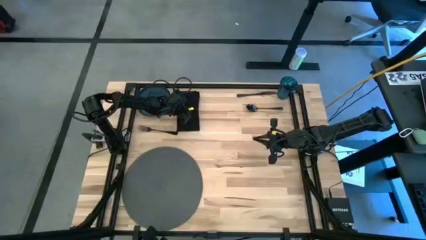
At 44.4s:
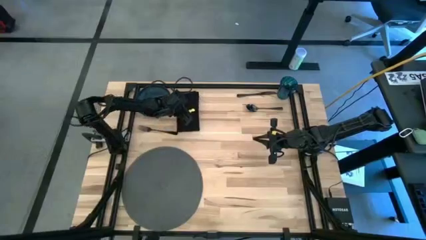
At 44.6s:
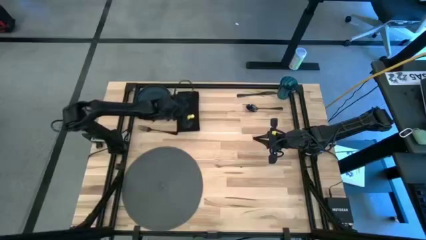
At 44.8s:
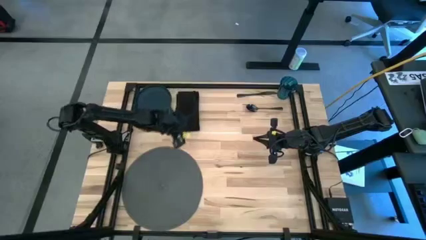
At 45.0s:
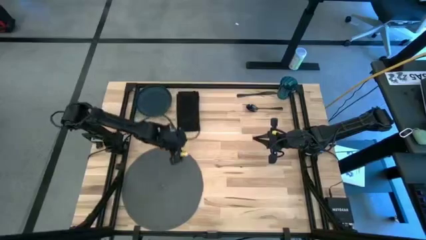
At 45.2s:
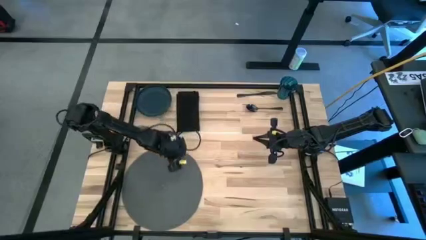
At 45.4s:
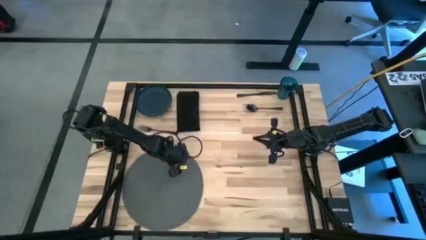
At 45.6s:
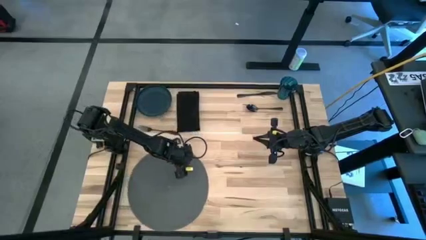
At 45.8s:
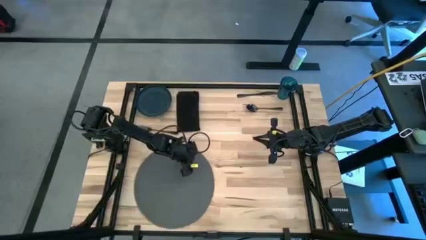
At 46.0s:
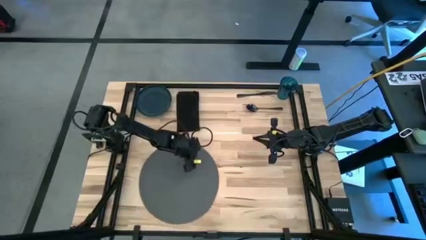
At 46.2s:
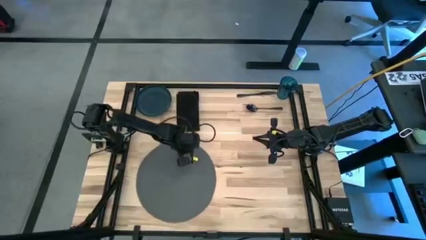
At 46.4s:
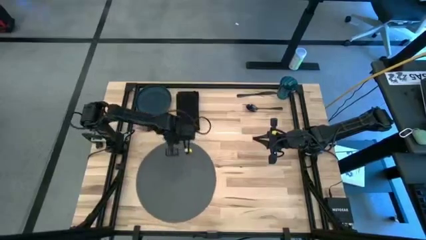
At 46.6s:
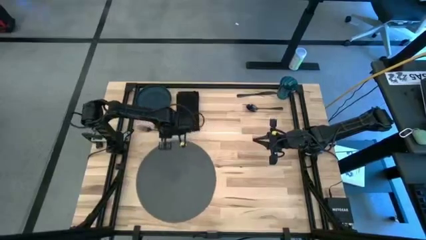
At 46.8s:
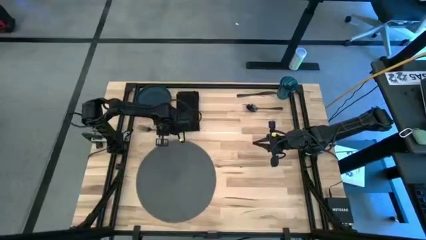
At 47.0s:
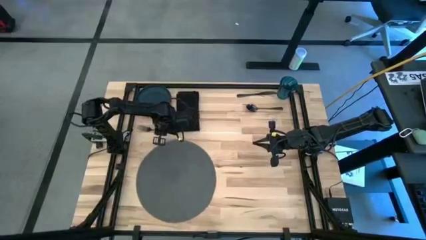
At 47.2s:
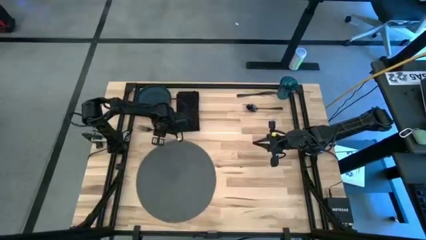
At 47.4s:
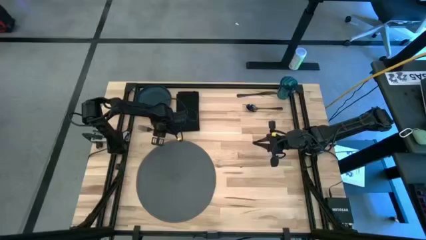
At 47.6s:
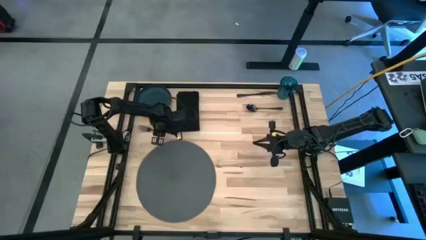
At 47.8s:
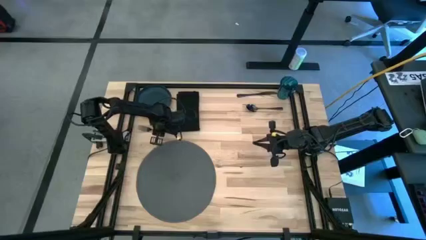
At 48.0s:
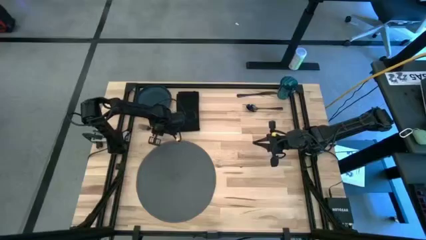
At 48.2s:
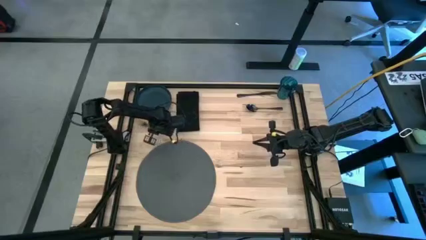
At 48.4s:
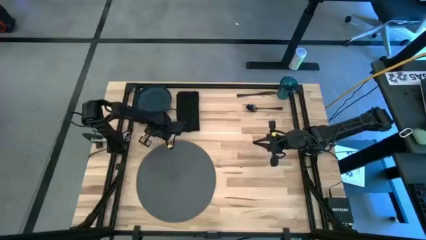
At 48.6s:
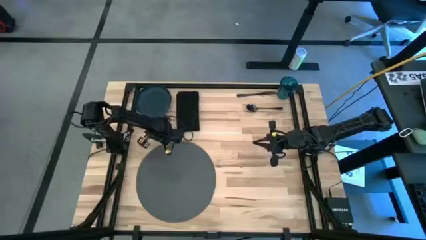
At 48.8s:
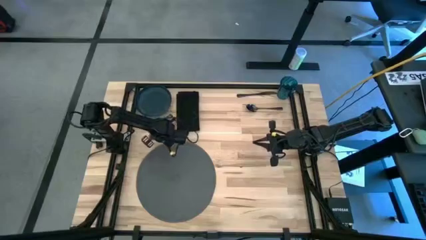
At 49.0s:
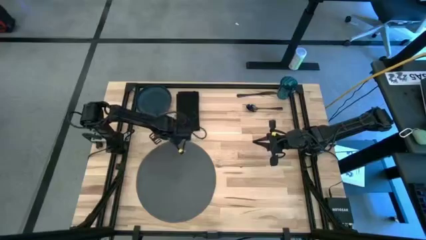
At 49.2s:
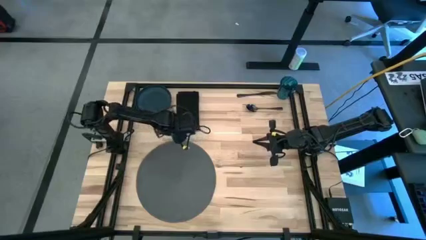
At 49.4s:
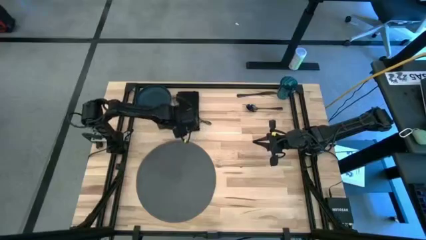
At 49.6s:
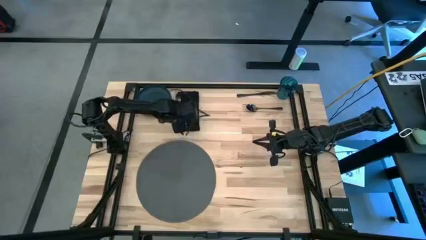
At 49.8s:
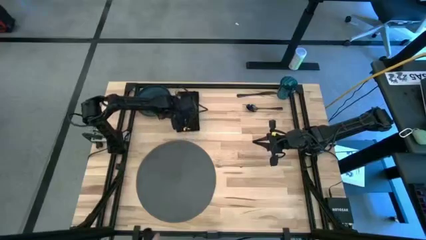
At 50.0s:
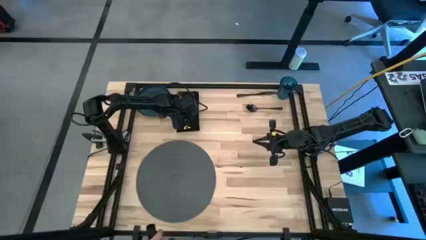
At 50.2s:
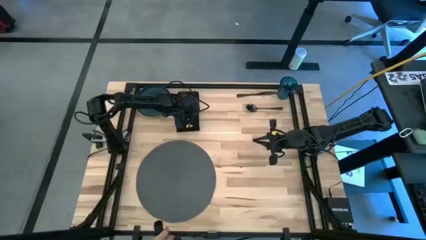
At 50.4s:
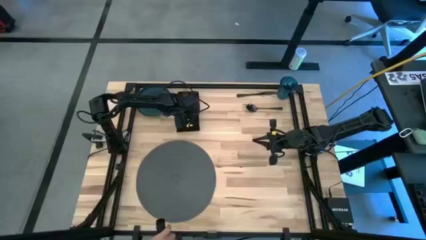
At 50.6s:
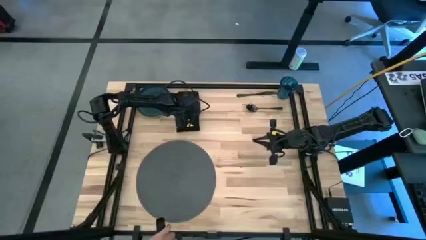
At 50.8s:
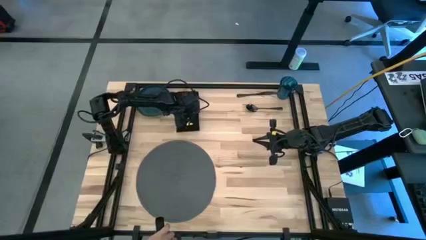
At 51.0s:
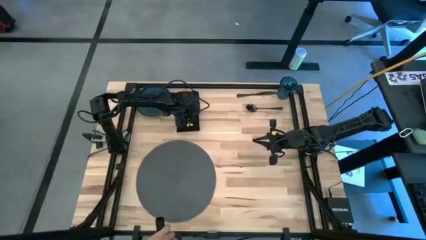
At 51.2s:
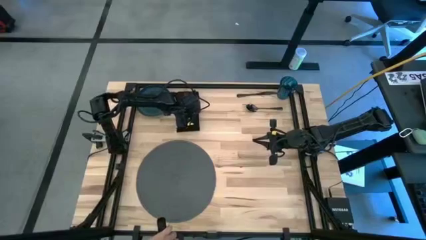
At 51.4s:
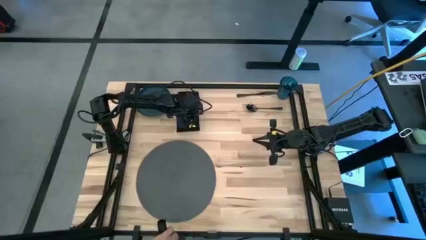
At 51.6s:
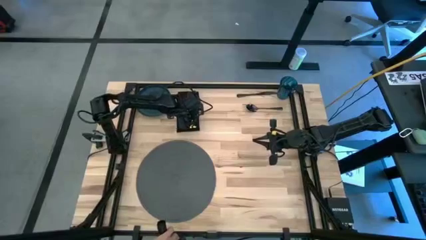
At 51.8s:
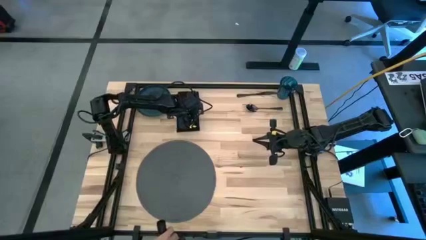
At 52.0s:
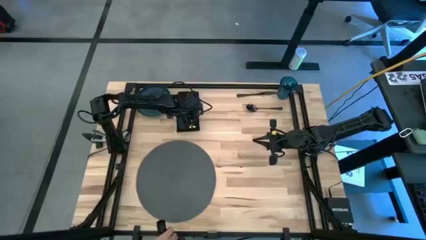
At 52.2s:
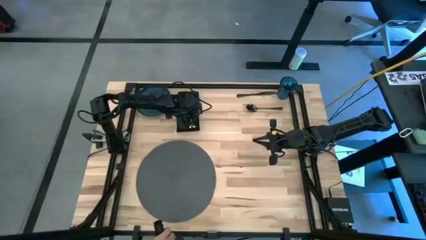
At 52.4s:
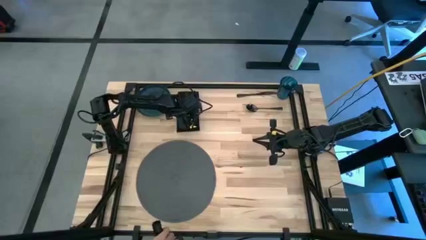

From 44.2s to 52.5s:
Task: Set table place
Put the black fork on top of the black table napkin

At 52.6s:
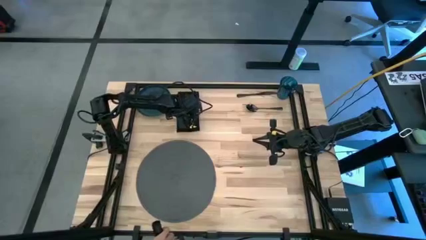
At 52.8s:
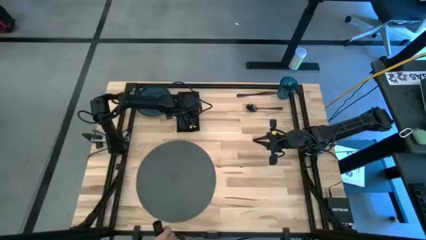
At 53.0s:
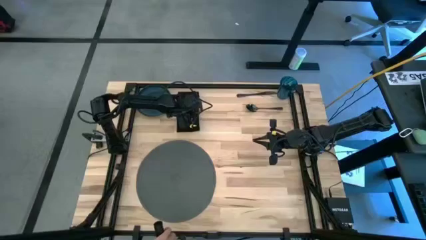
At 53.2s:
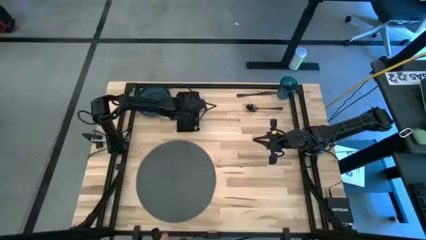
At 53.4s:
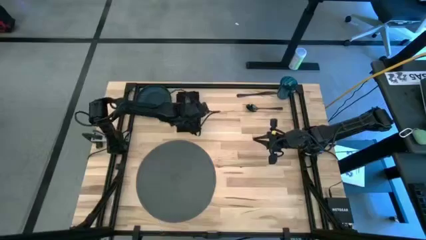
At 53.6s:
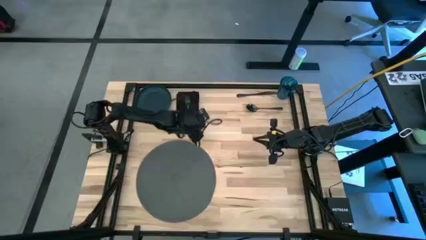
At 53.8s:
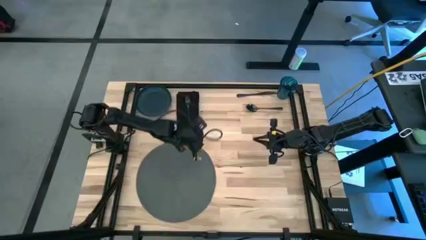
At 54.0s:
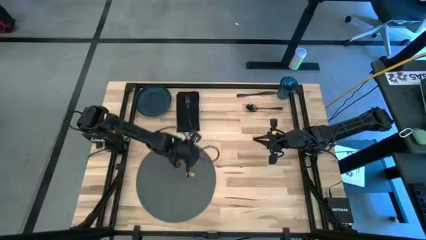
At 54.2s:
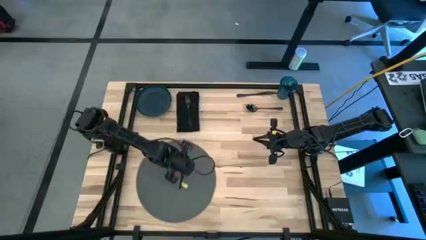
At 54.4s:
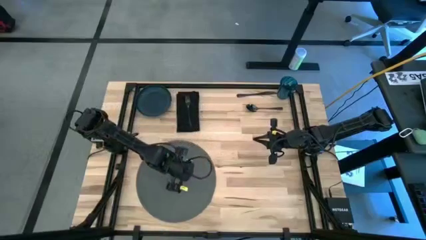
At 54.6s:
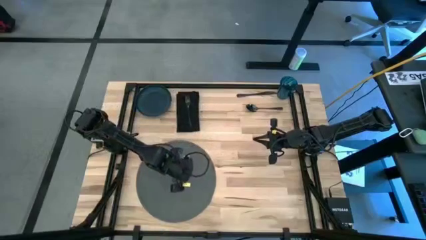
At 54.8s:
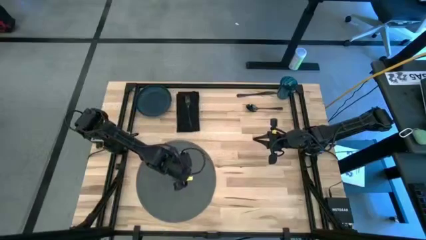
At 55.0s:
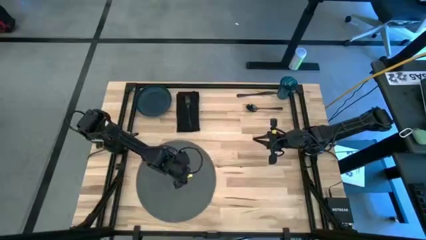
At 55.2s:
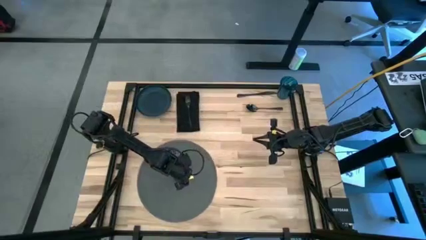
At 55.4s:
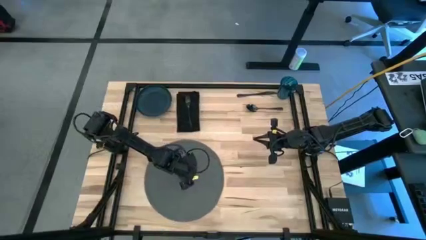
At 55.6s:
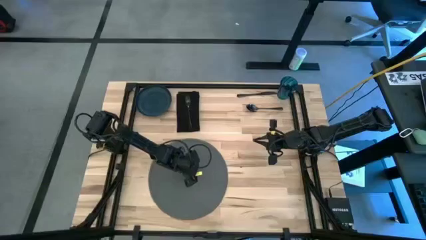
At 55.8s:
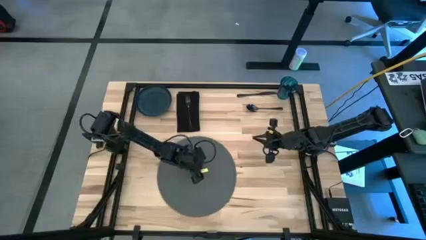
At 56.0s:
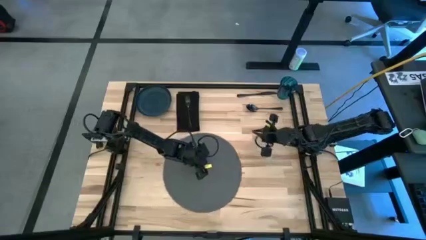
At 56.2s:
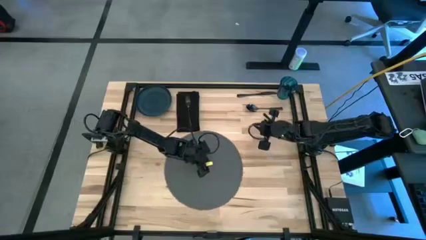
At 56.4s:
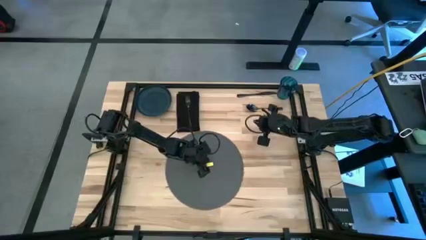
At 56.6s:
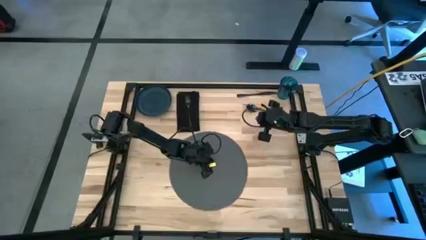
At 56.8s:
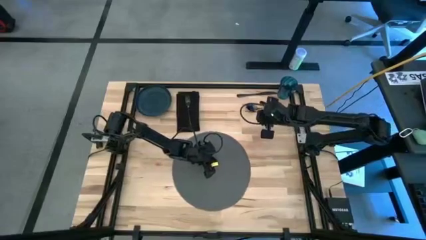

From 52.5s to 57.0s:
Prepare the gray tablemat

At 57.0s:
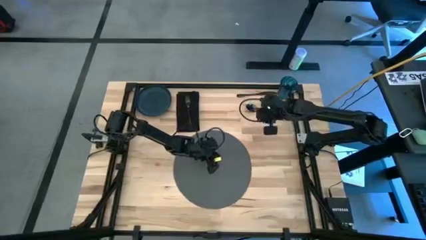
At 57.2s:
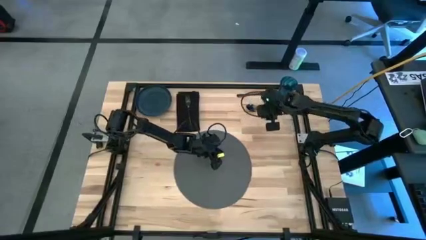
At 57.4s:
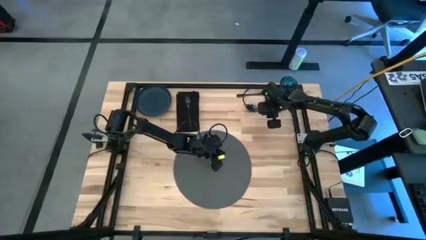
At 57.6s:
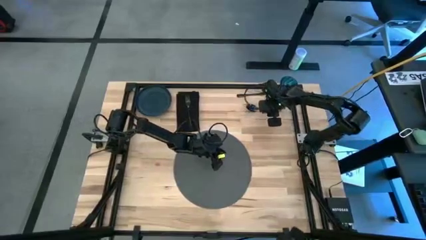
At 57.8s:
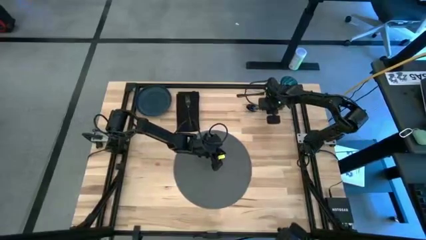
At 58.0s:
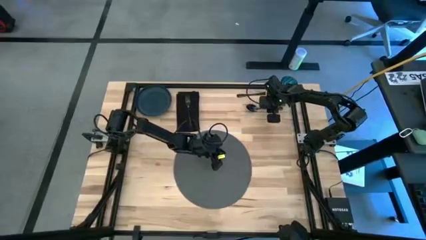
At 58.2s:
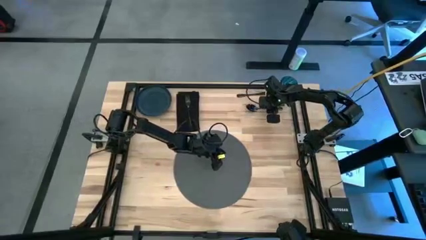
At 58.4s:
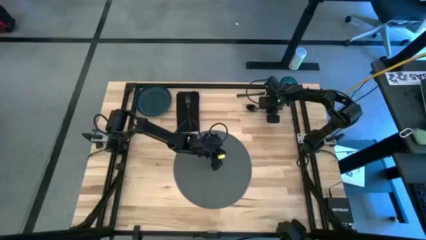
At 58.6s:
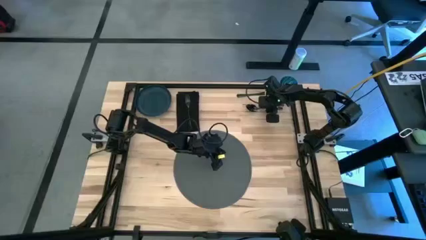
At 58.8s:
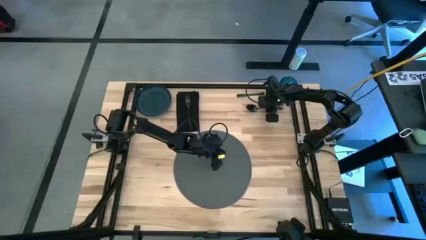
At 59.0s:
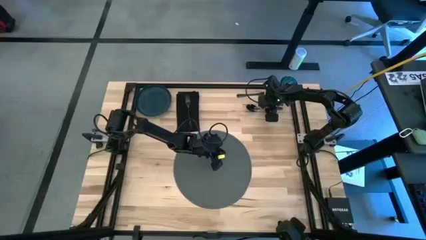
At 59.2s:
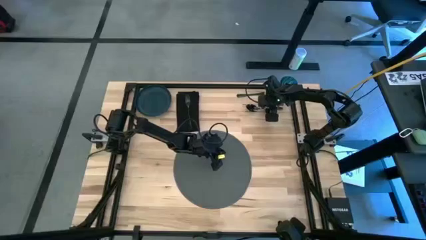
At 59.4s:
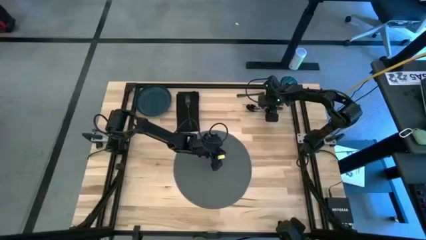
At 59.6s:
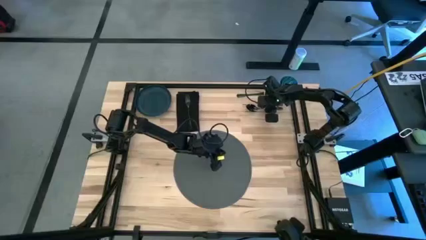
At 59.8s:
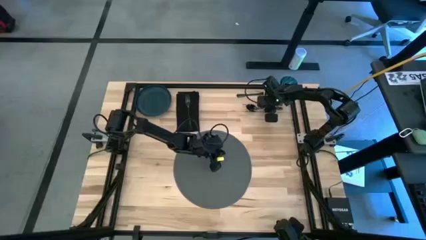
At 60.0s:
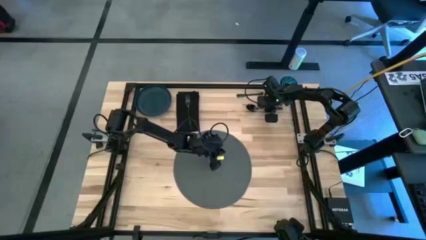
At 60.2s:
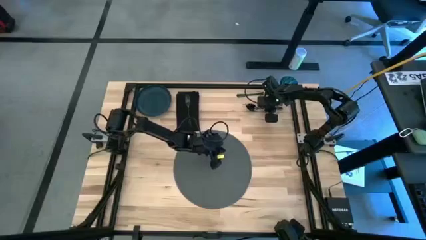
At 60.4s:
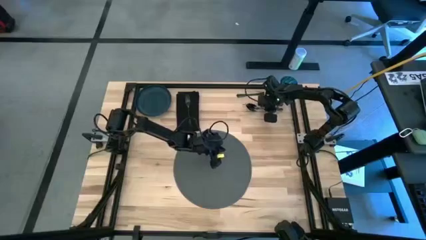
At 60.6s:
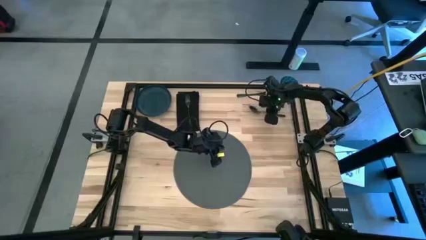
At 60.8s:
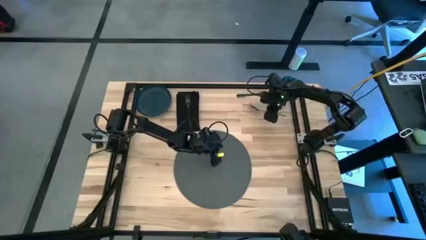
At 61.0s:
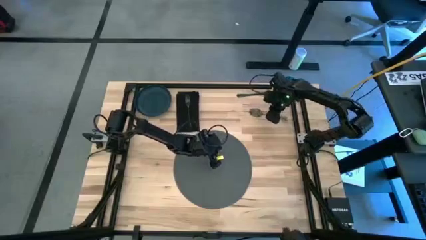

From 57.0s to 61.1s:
Put the black spoon on the gray tablemat
